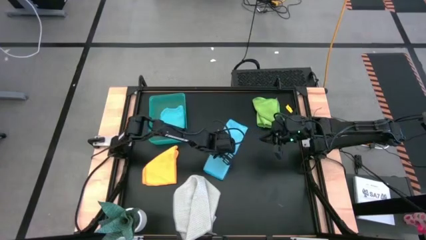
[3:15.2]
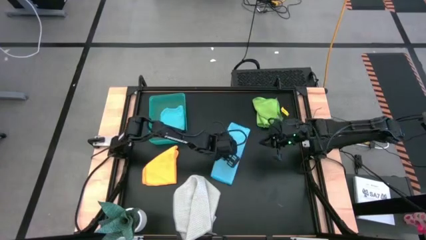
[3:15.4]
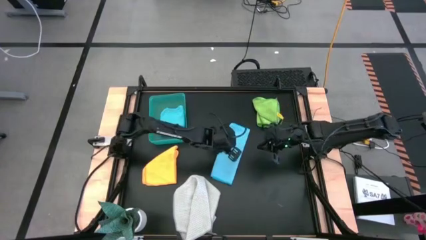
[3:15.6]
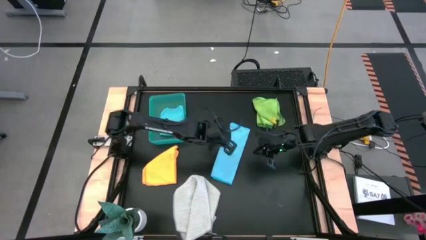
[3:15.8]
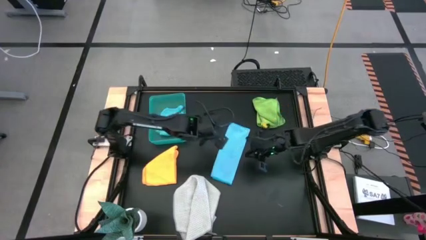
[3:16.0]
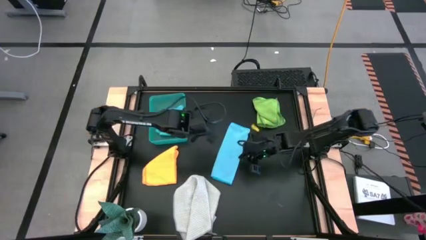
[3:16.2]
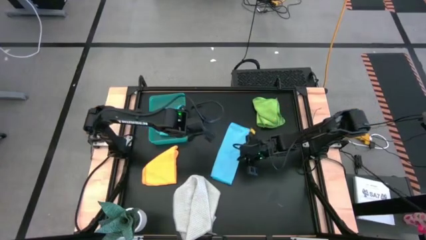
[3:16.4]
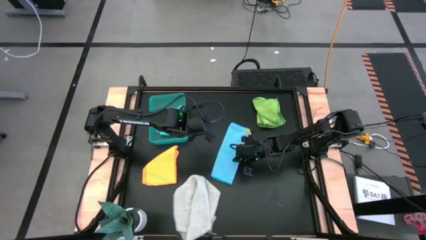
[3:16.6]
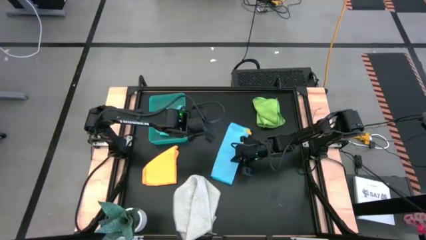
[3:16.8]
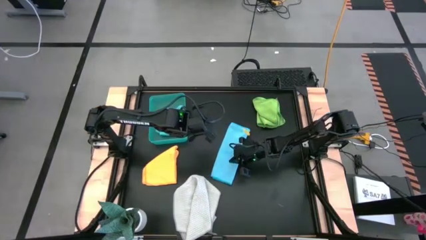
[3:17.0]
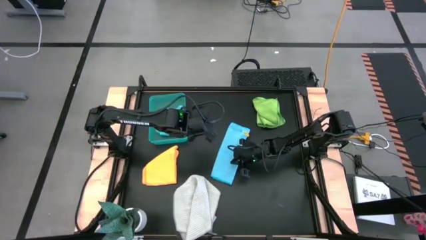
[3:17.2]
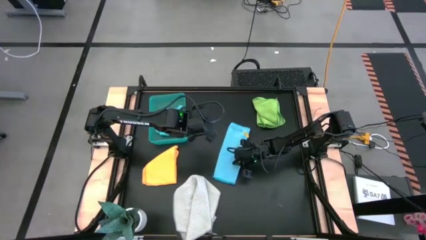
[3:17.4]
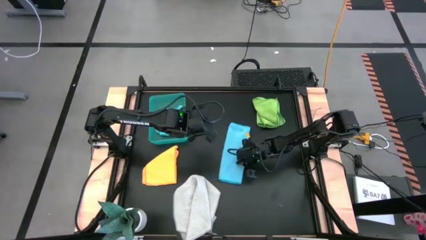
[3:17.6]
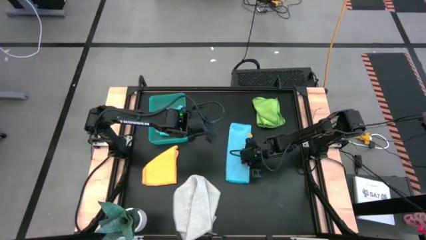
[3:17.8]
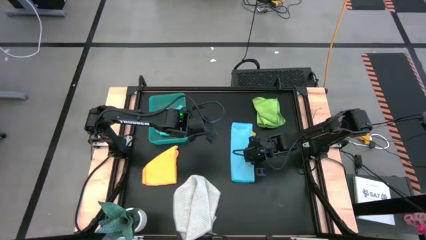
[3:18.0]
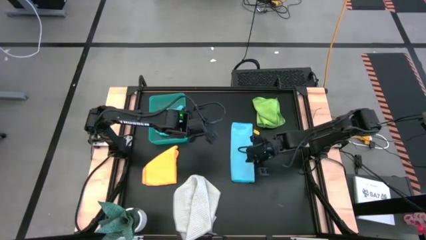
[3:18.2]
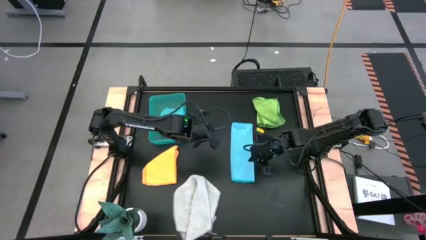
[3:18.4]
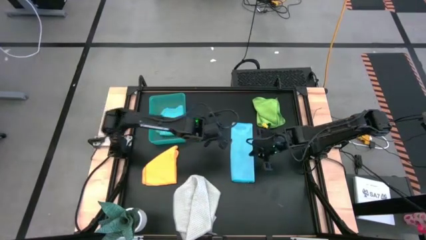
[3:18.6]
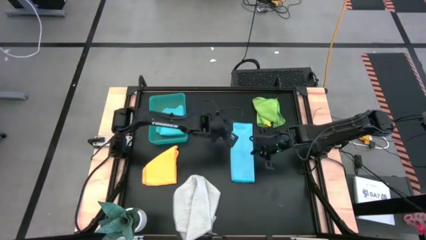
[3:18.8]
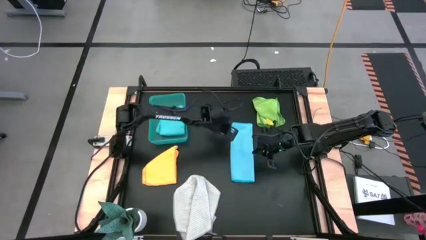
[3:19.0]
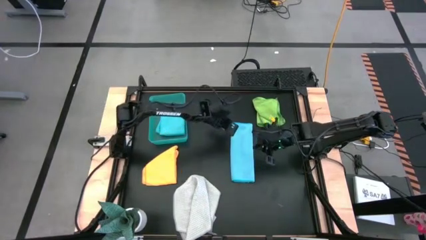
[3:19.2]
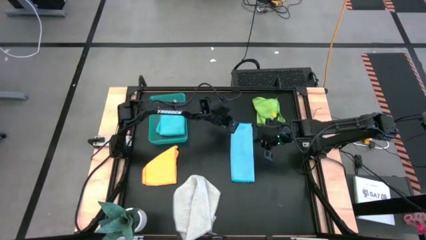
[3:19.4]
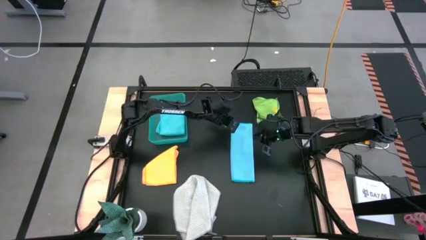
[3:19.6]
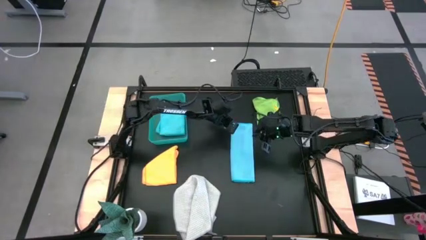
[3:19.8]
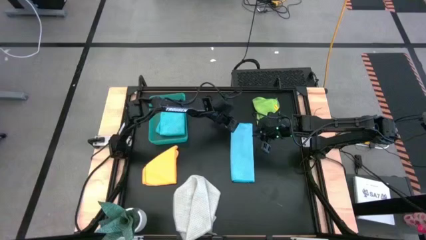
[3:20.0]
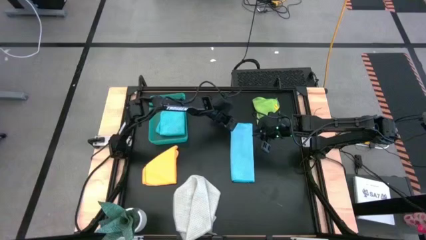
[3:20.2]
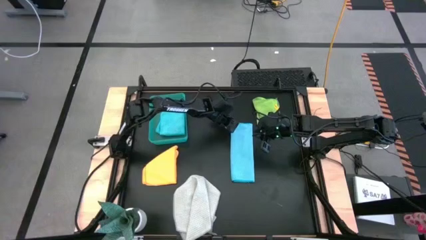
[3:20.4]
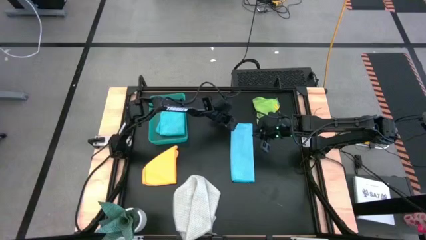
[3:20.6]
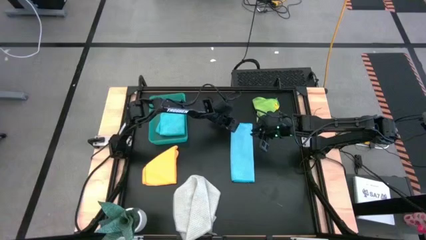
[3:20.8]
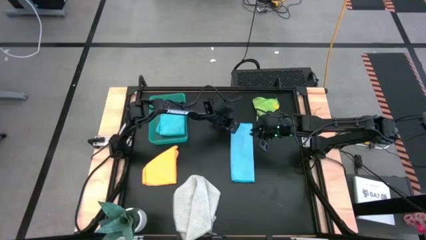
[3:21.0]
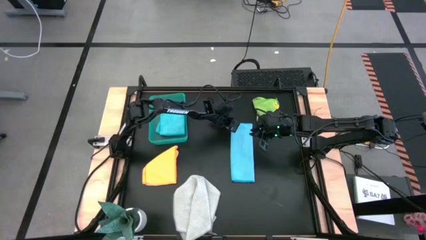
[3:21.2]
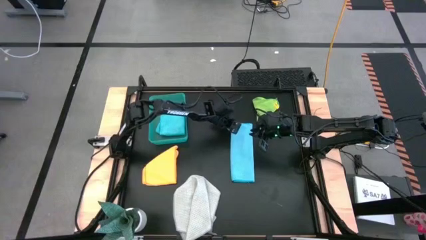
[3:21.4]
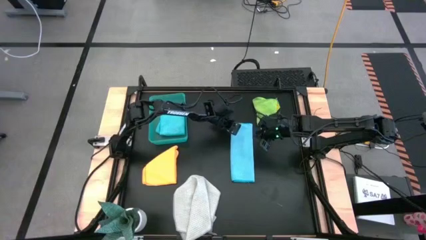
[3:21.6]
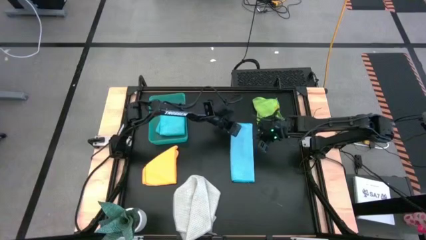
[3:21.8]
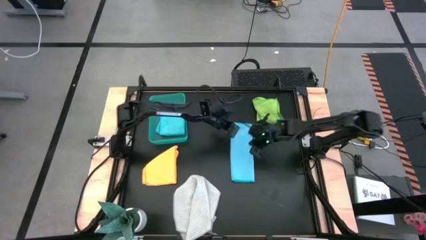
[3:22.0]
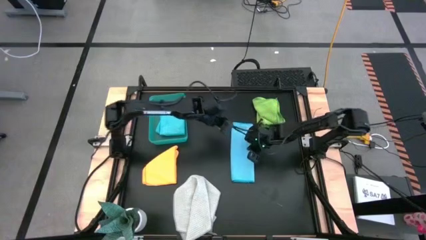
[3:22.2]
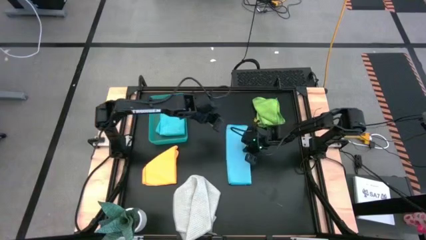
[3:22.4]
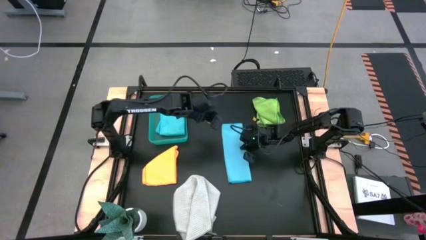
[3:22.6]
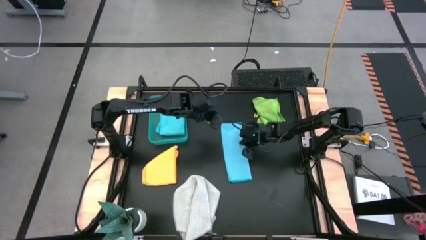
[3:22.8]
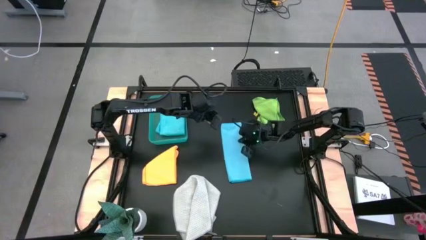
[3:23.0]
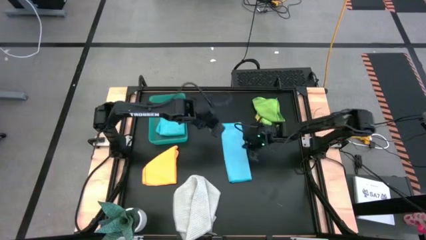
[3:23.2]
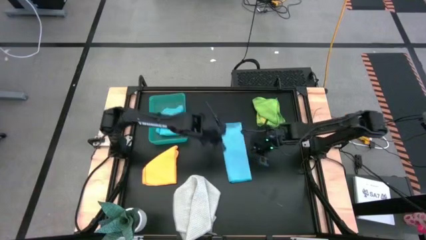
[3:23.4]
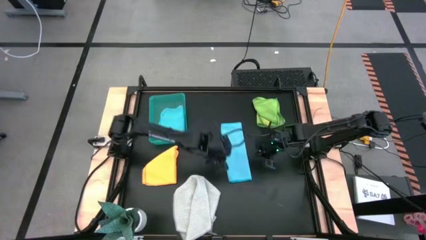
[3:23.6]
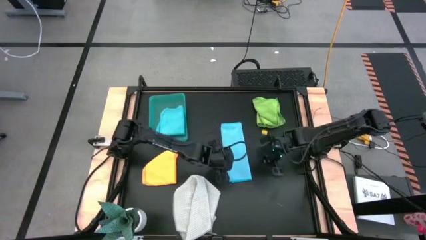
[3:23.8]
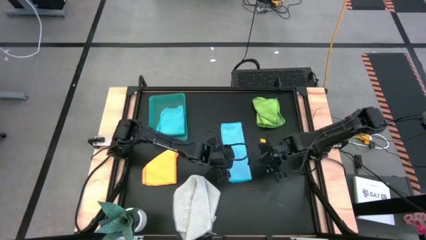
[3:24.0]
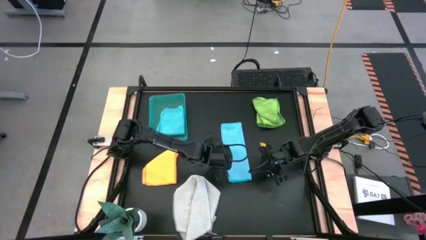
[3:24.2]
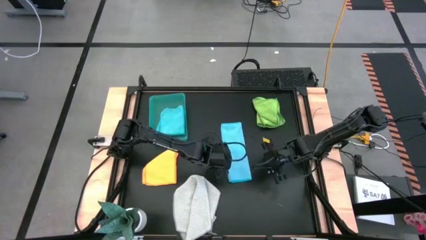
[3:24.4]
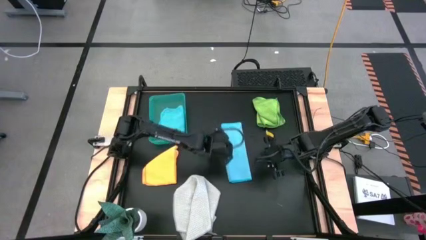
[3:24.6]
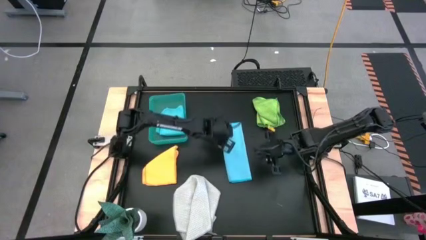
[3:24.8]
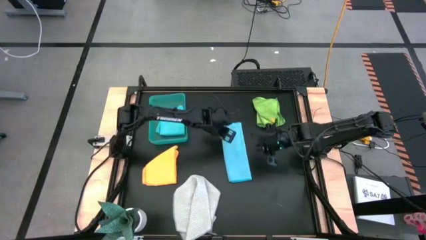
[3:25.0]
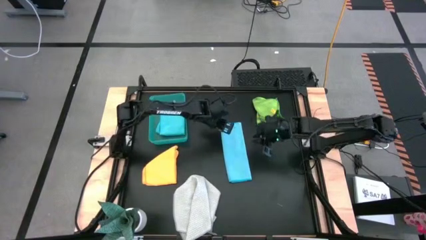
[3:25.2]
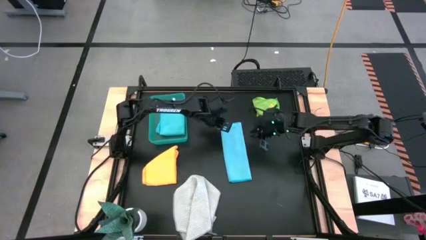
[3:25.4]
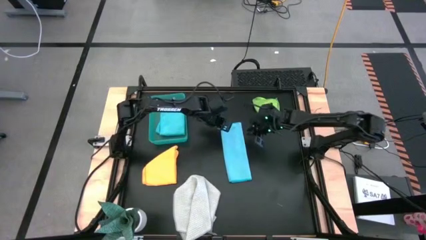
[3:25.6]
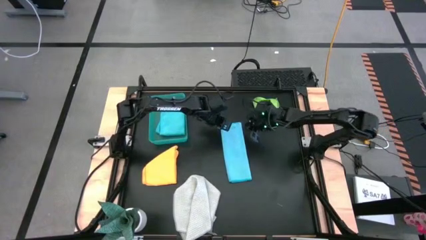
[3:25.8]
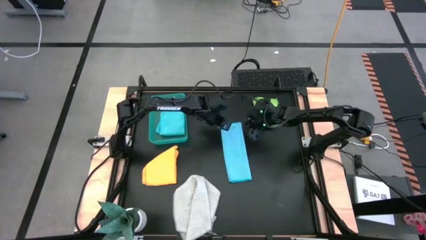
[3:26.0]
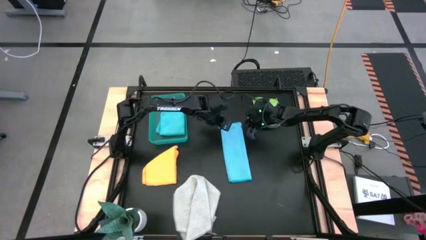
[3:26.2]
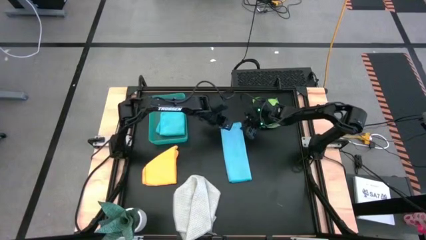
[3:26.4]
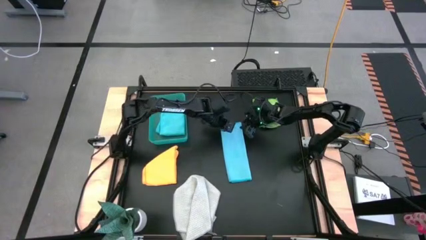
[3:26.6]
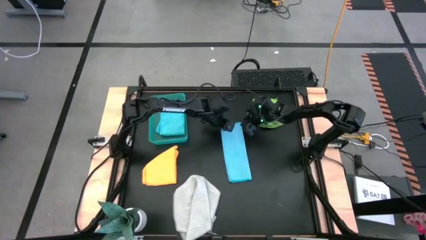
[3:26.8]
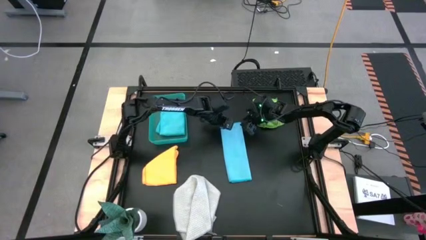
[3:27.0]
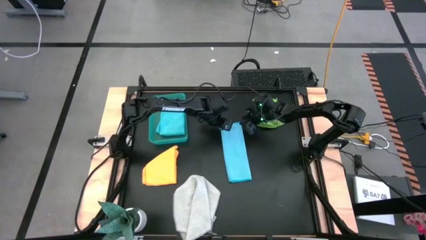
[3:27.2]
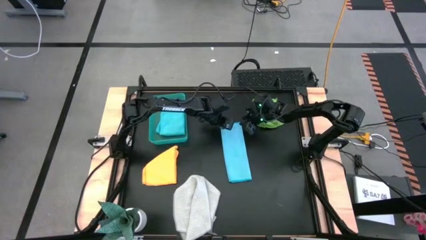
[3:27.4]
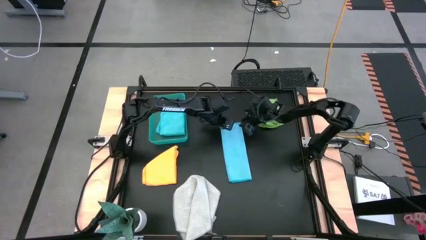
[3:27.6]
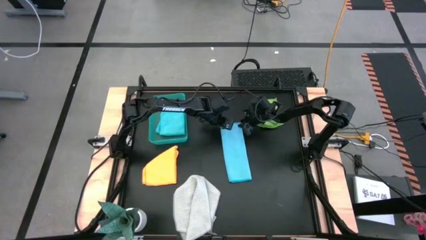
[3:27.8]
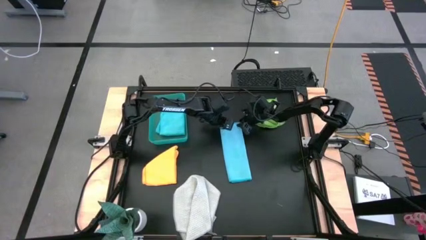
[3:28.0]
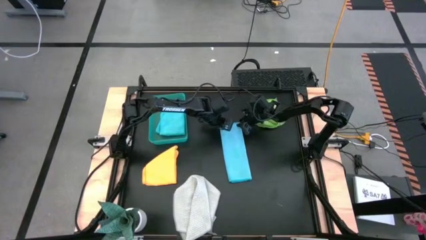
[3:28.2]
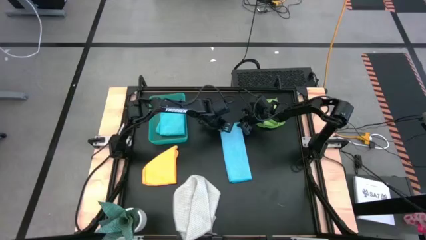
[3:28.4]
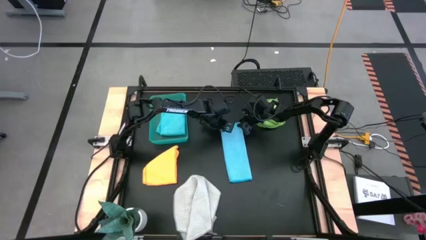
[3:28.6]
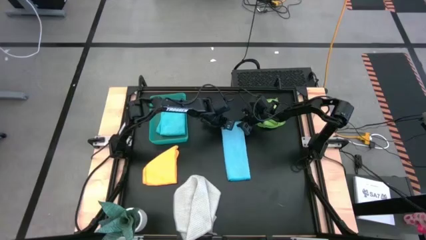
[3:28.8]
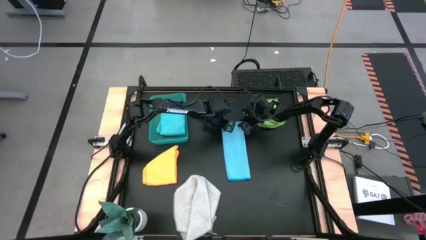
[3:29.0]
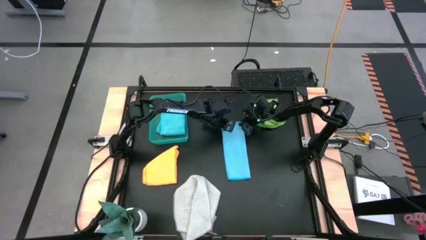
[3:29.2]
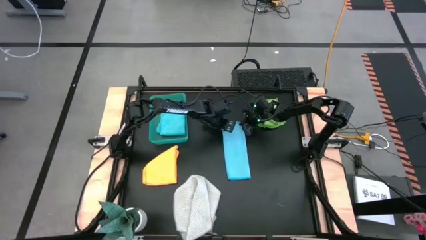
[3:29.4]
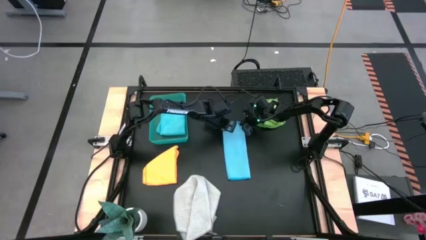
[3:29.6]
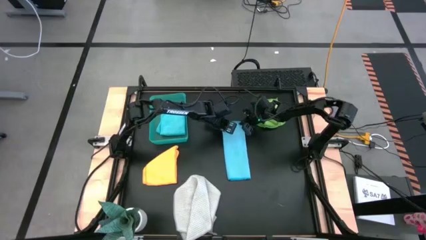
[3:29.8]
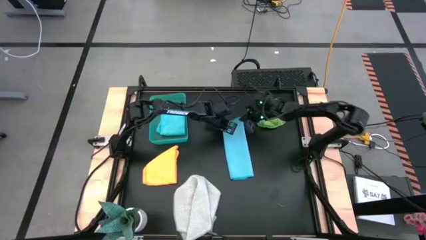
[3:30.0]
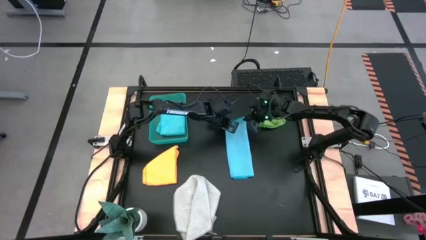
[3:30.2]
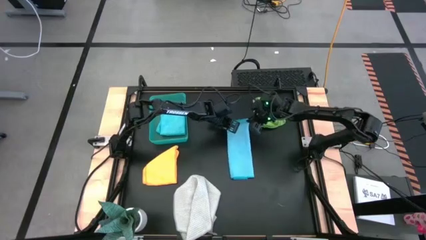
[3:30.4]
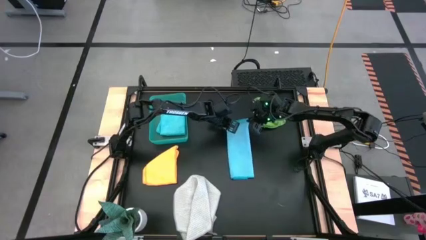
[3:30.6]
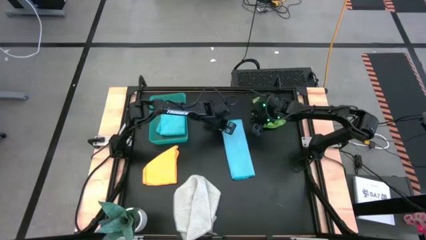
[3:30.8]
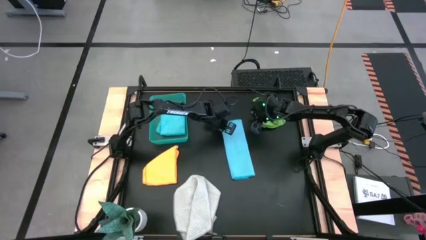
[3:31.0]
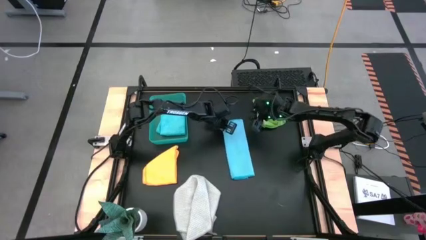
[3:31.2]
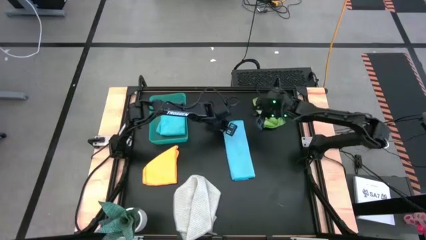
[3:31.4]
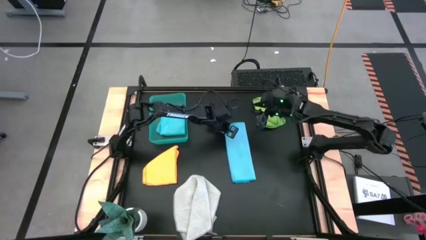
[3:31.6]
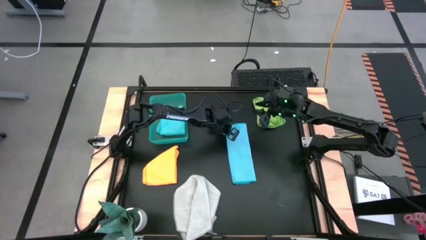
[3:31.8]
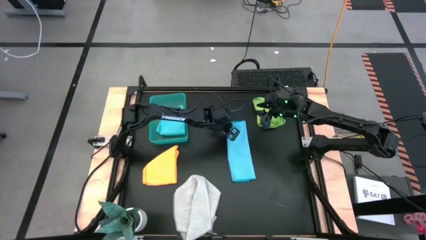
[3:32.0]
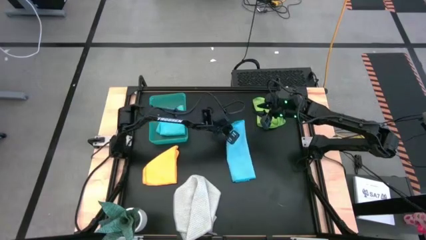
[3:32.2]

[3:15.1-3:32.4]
Task: Fold microfiber towels
Fold the blue microfiber towel
